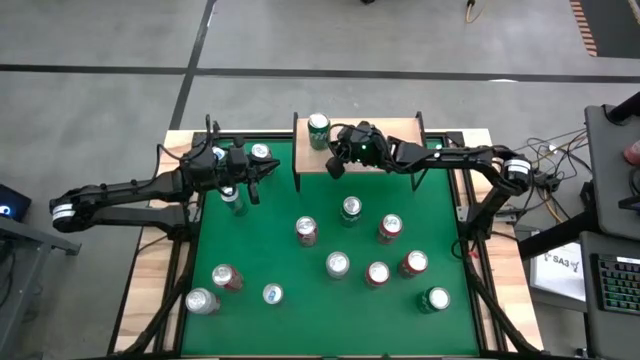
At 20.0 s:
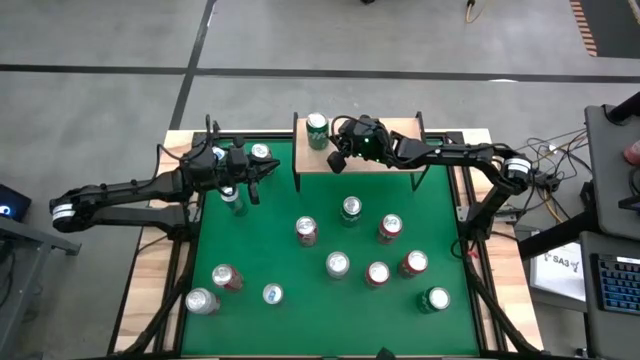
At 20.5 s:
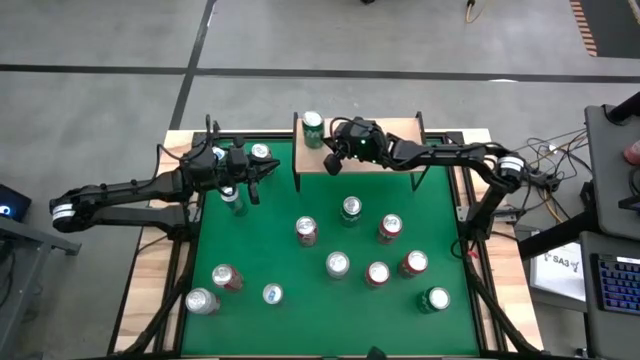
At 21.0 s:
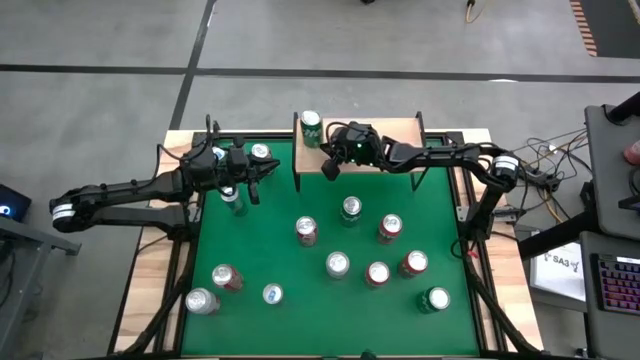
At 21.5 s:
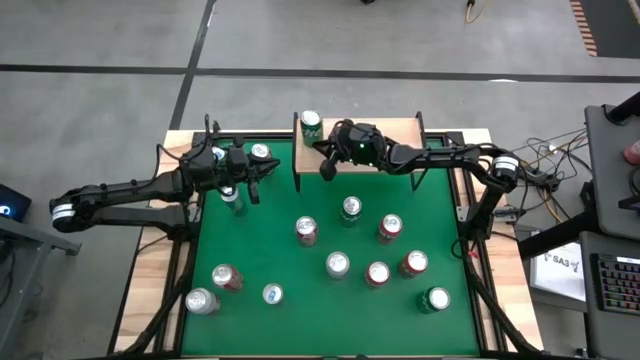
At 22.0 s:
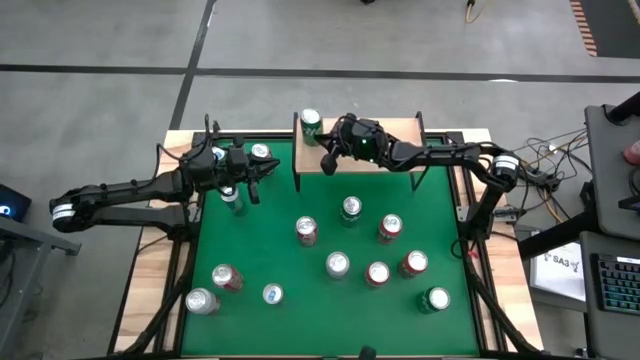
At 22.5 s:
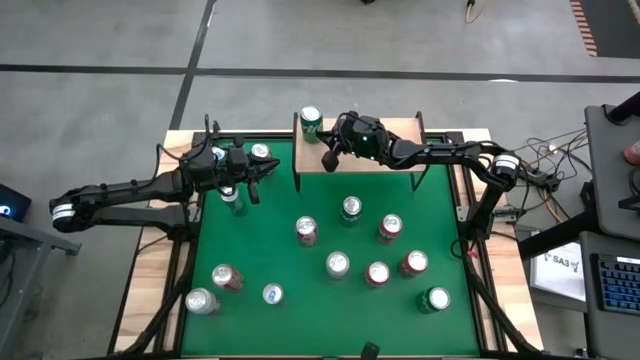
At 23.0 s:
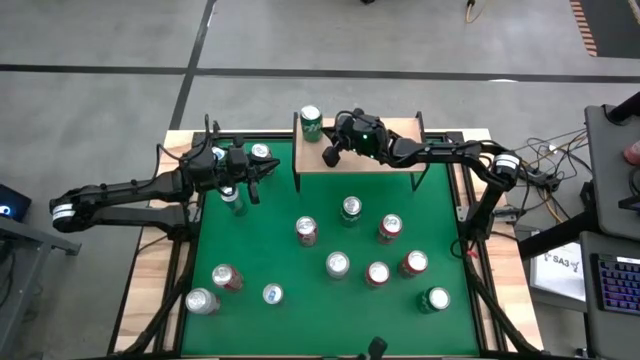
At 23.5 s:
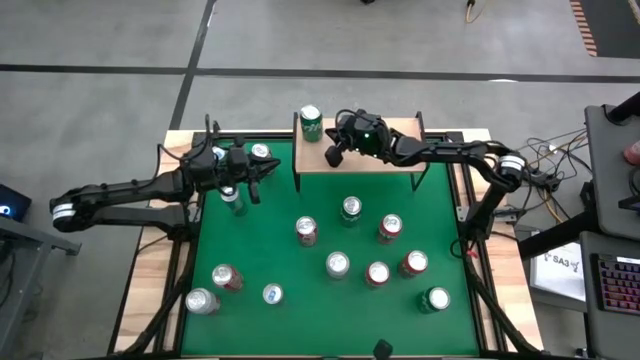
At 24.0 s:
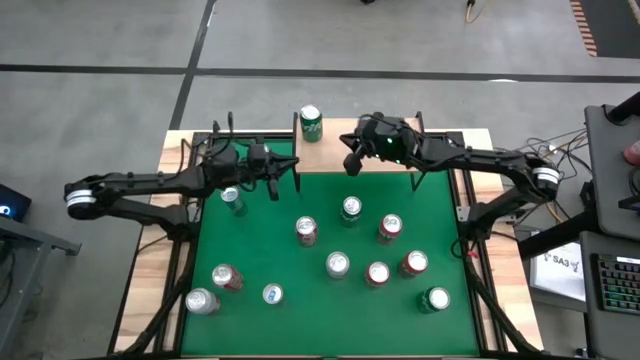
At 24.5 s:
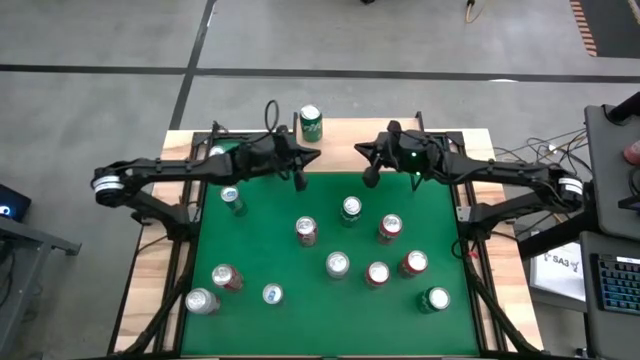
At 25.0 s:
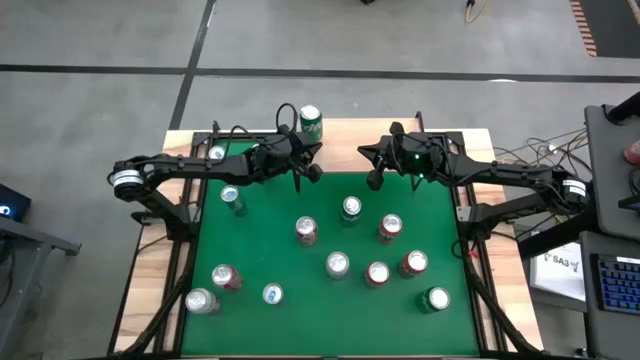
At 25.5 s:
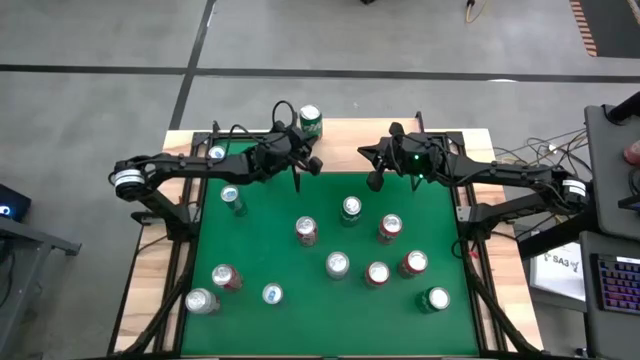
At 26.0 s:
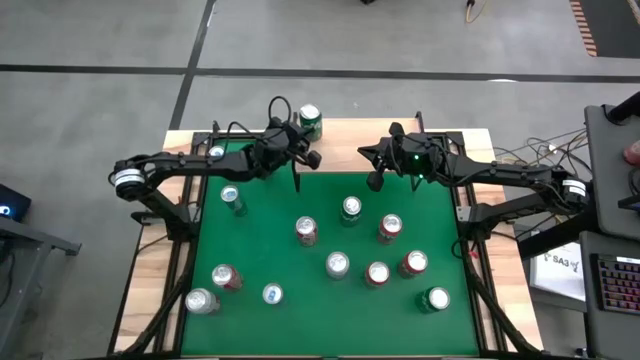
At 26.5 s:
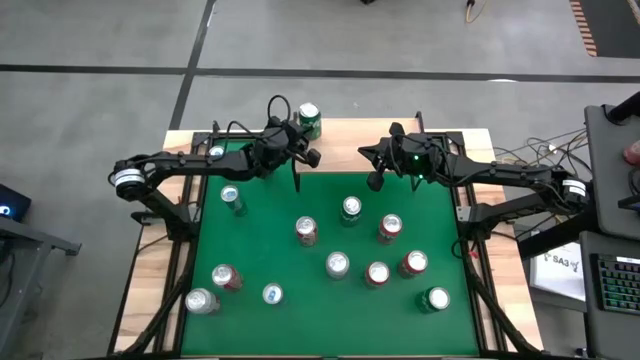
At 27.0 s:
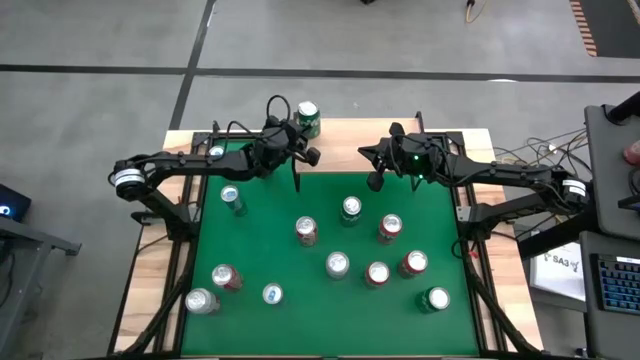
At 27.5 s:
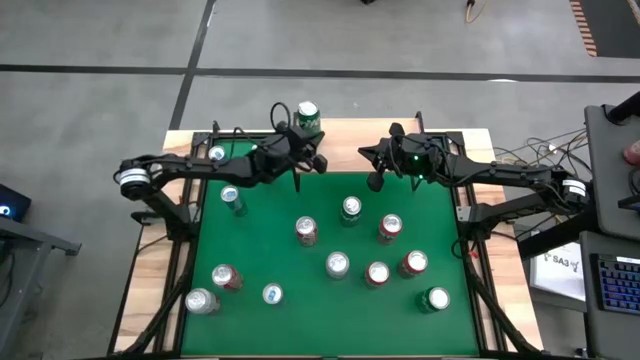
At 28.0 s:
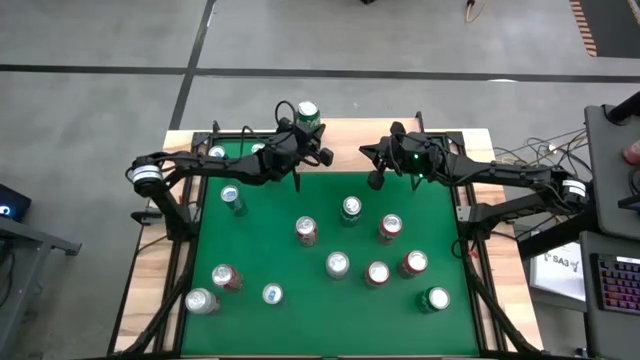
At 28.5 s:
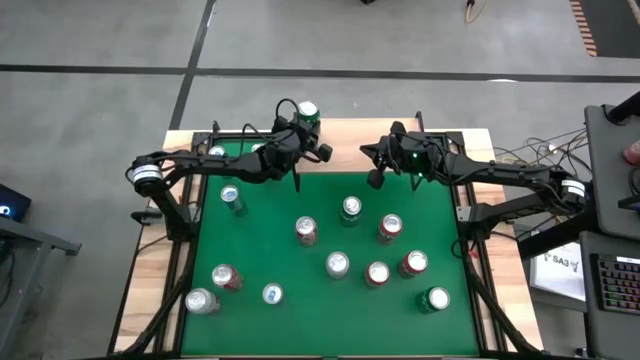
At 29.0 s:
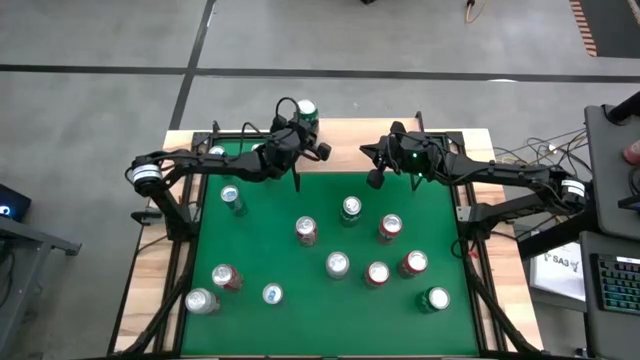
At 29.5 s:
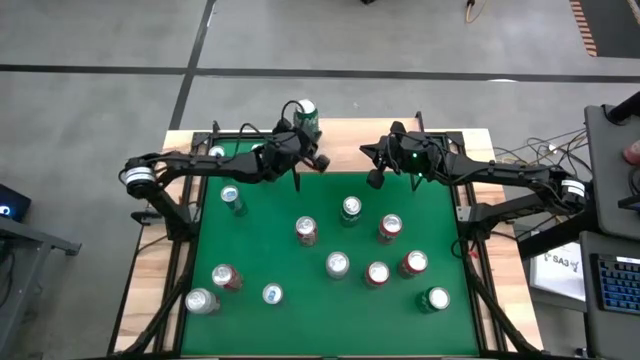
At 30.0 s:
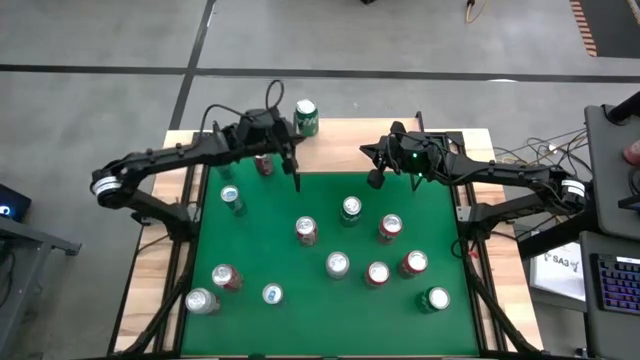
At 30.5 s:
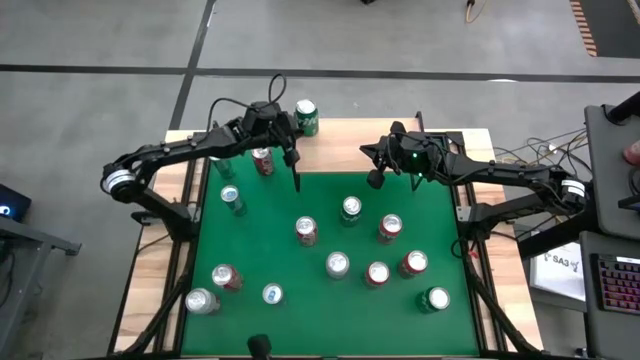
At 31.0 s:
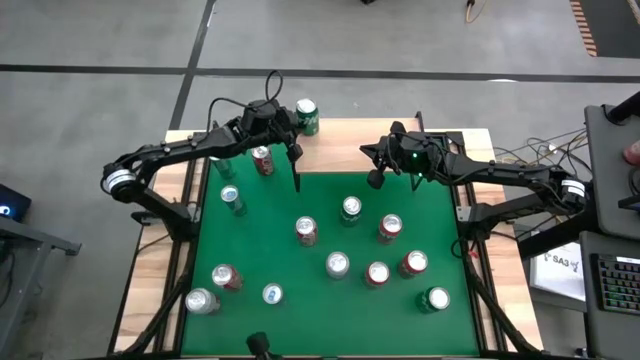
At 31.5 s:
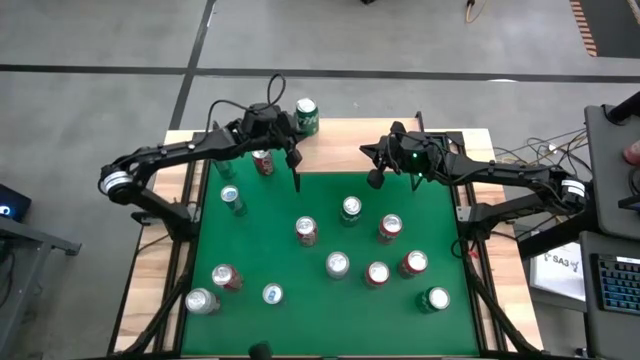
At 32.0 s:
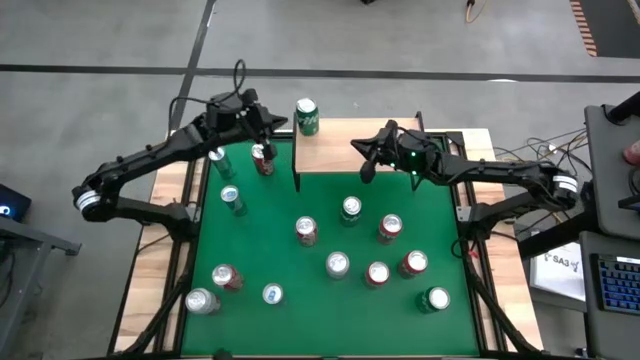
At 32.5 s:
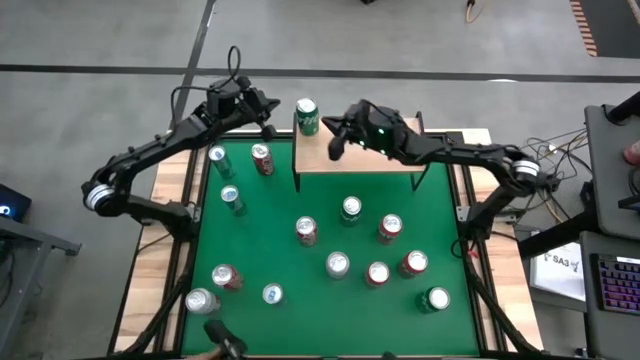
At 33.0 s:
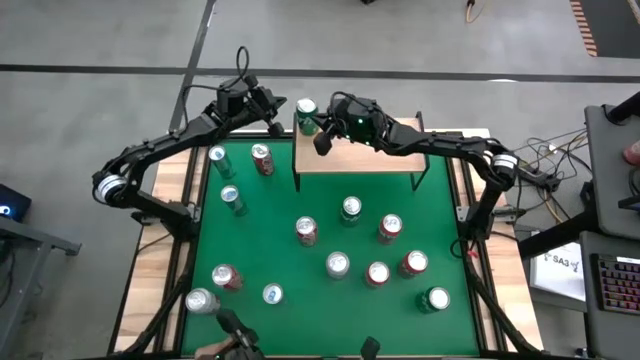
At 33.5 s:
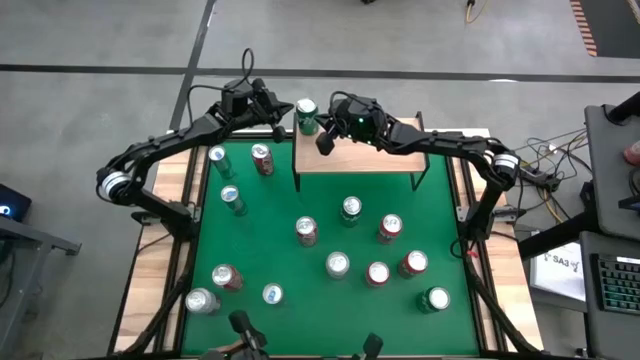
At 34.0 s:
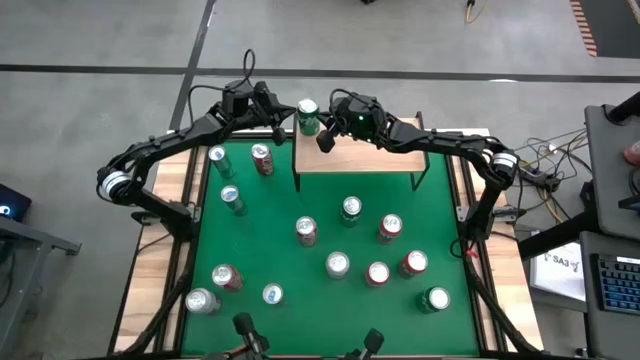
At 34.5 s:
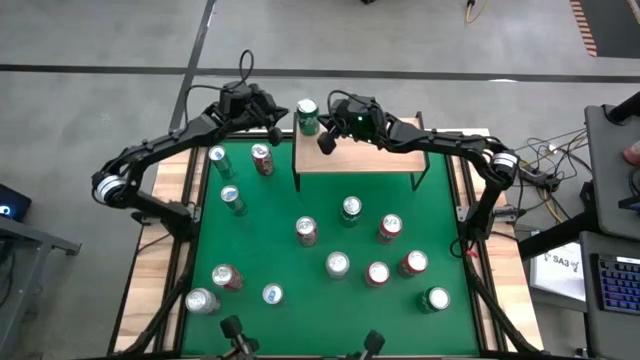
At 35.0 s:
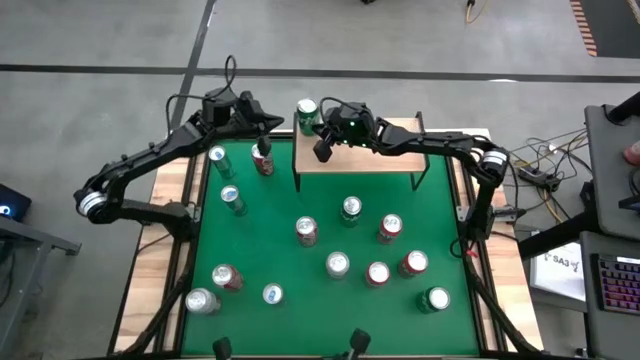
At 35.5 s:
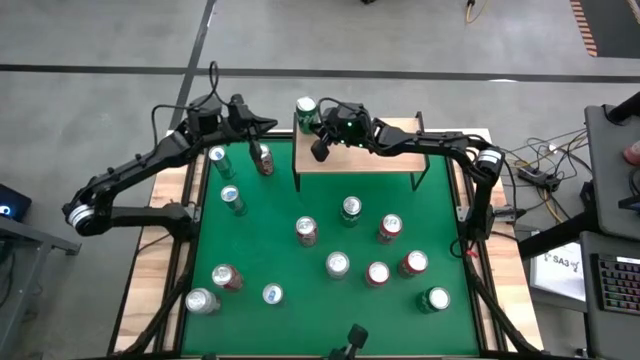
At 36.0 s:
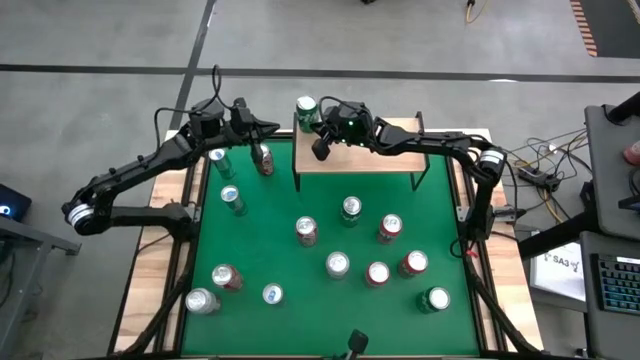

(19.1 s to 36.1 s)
Task: Place canned beverage on shelf
Put the middle green soda can on the shelf

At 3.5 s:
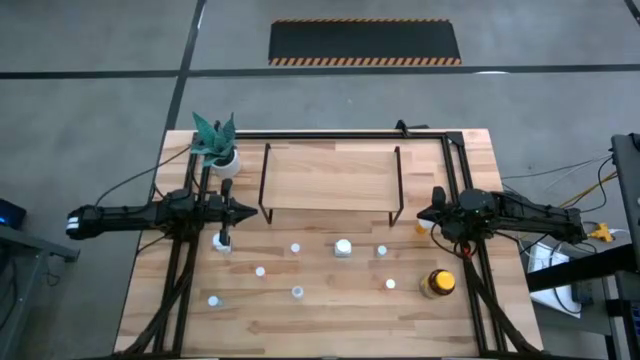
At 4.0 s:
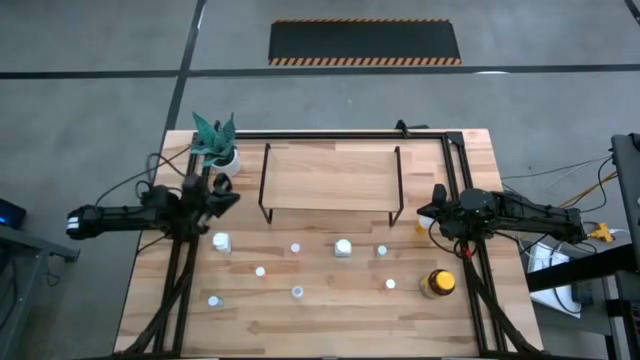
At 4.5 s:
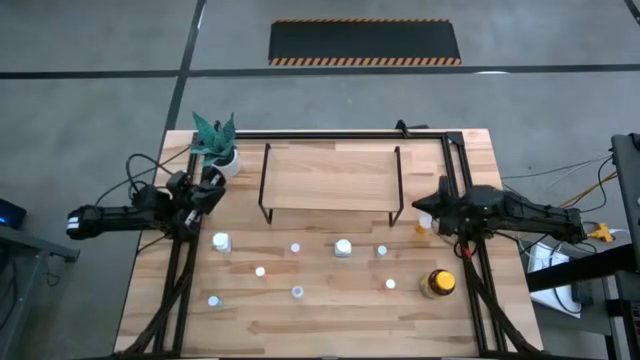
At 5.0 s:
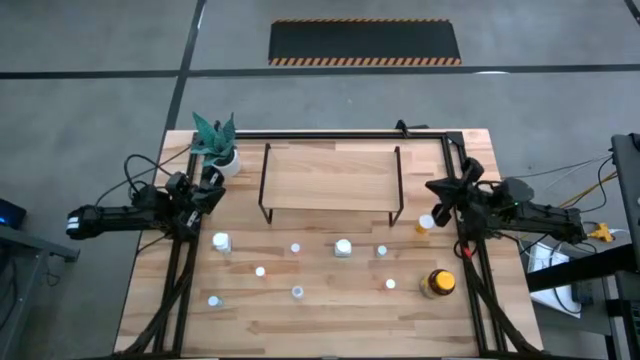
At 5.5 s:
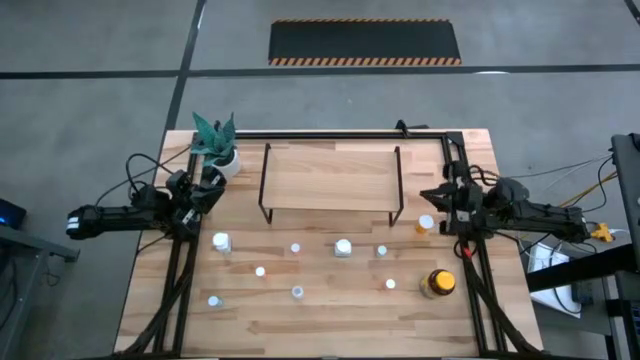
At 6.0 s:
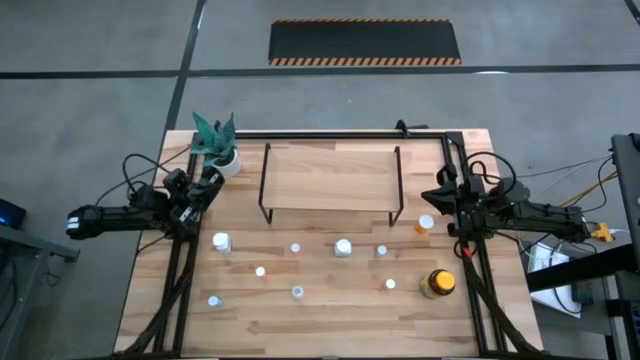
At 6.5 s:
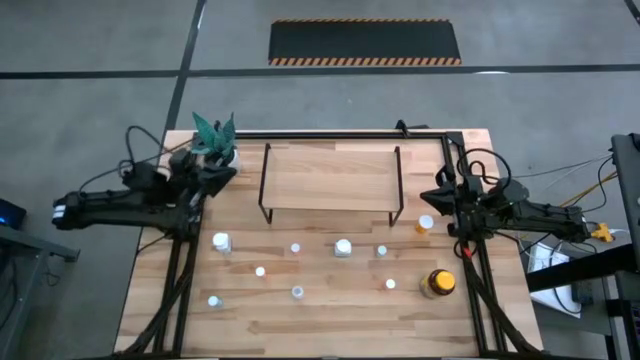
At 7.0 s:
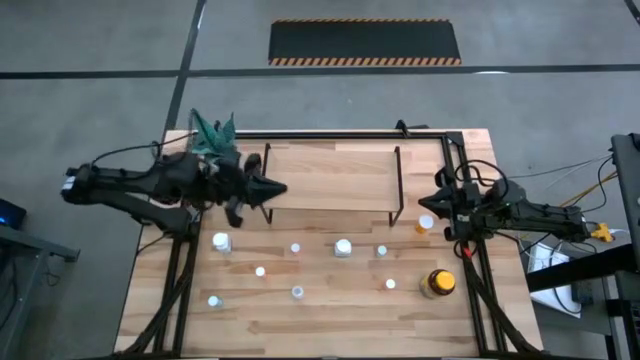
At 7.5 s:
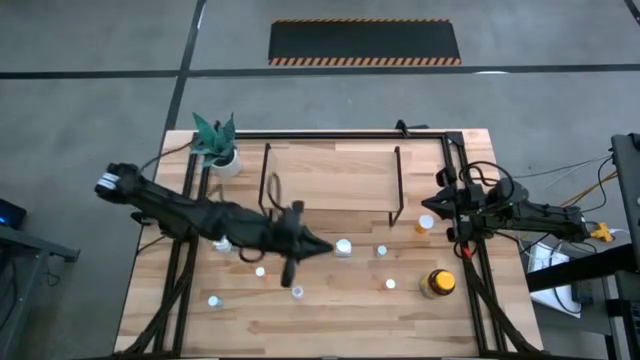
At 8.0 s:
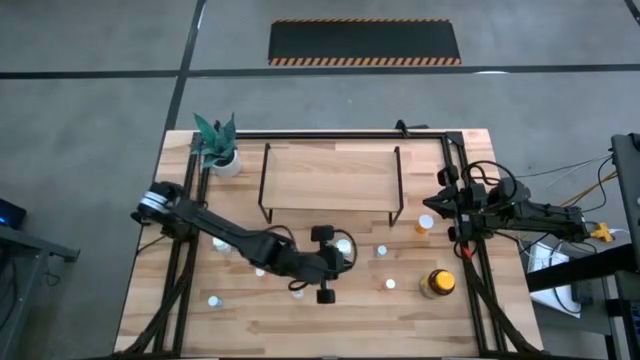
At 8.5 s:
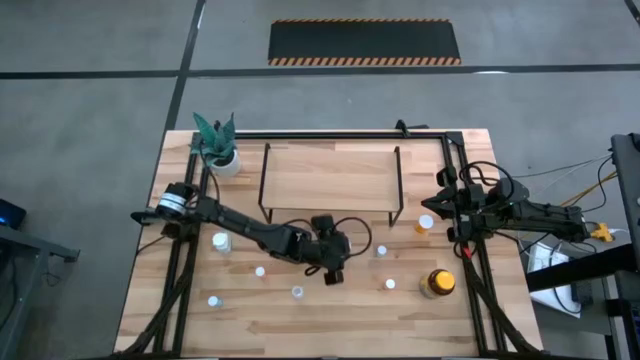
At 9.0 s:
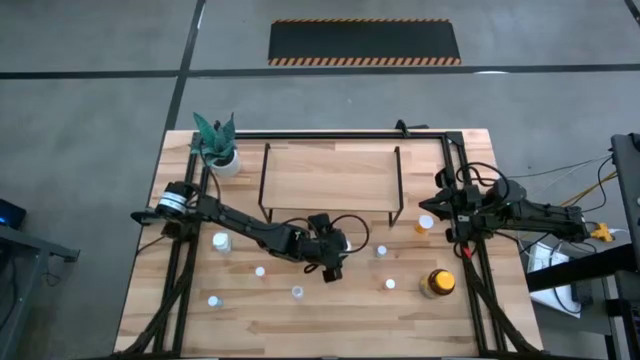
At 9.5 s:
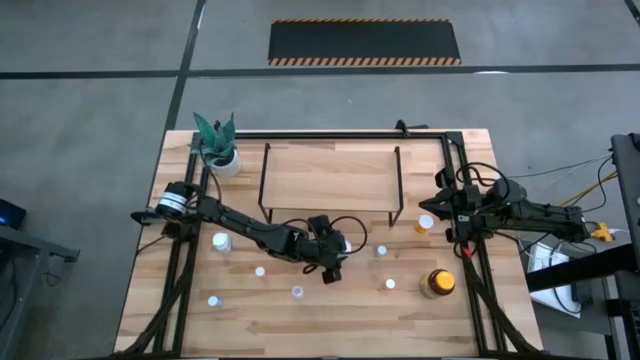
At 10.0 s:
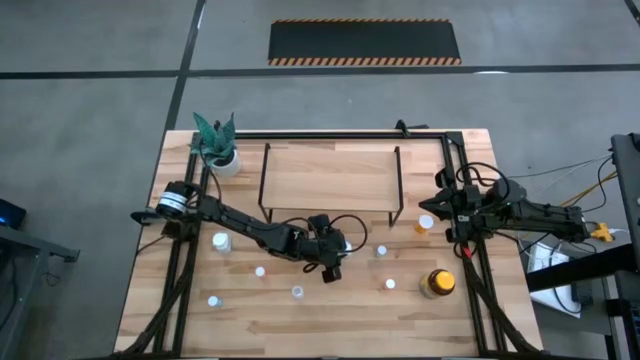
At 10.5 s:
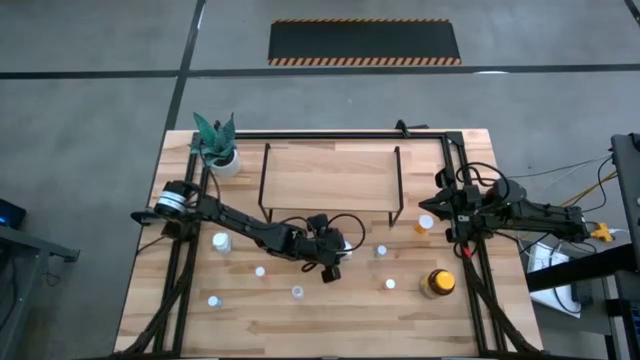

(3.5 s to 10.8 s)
Task: Pick and place medicine bottles onto shelf by color
Put the right white medicine bottle on the shelf
